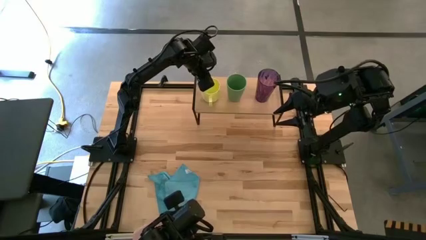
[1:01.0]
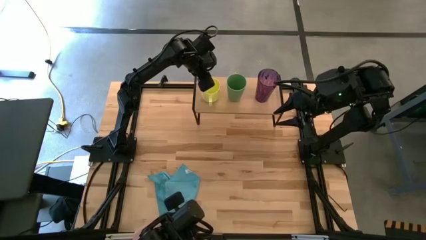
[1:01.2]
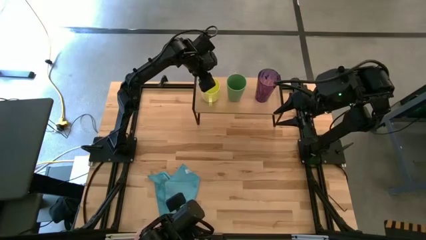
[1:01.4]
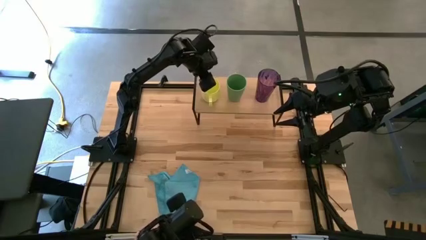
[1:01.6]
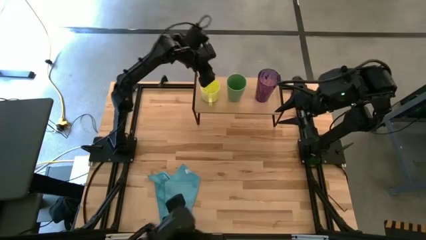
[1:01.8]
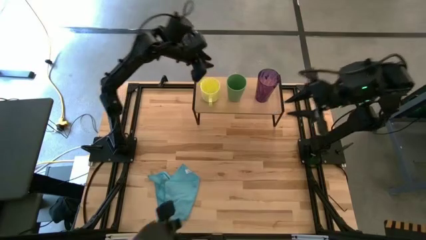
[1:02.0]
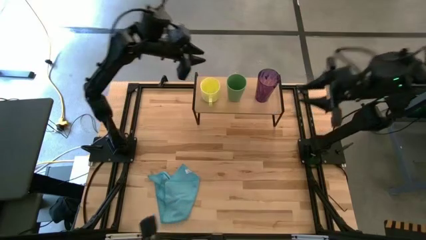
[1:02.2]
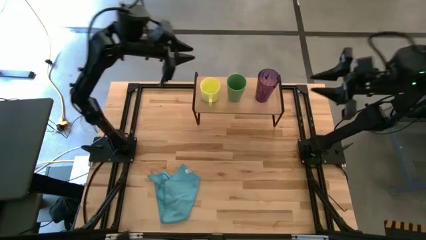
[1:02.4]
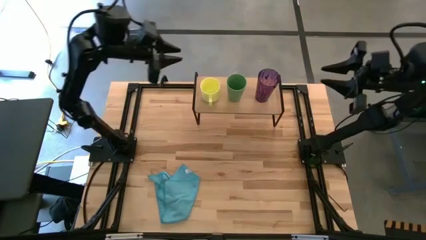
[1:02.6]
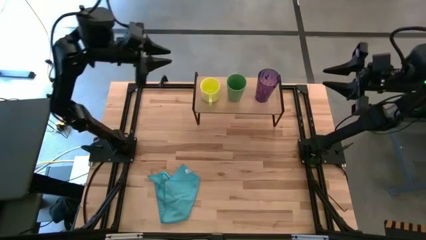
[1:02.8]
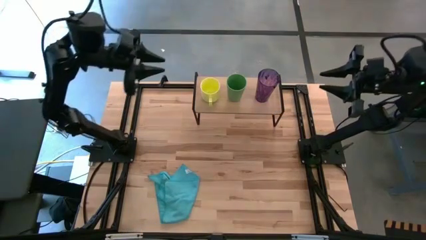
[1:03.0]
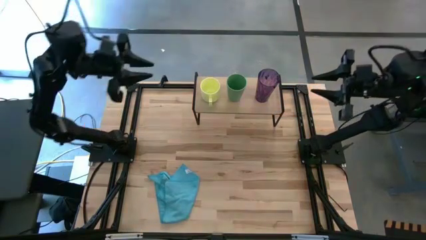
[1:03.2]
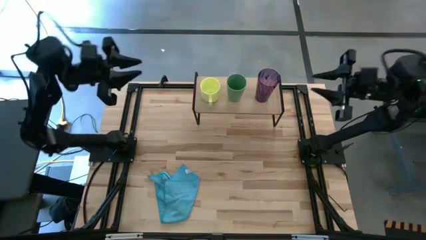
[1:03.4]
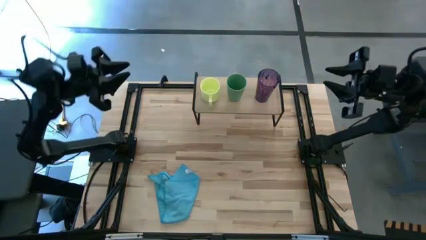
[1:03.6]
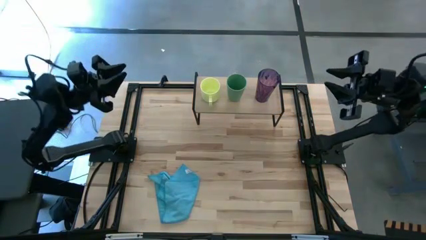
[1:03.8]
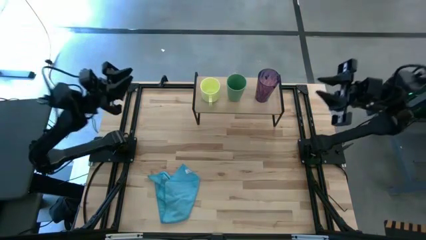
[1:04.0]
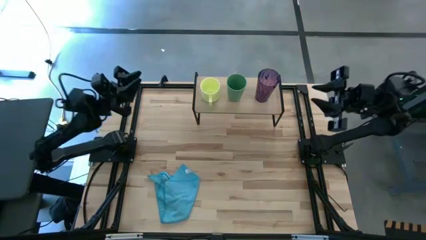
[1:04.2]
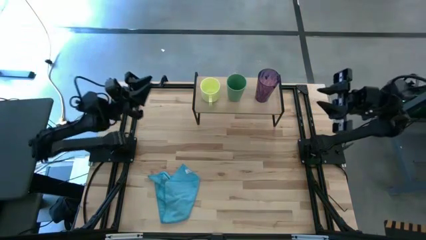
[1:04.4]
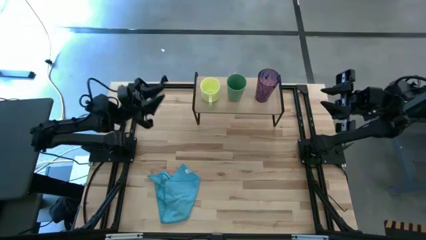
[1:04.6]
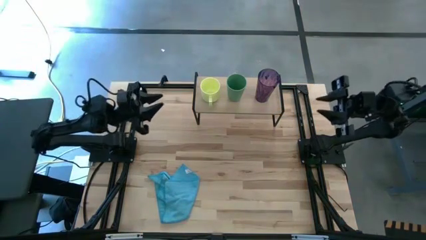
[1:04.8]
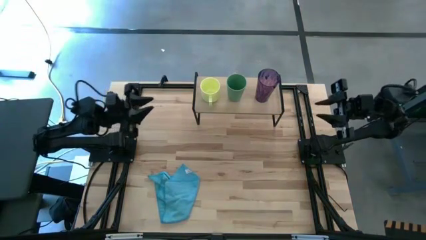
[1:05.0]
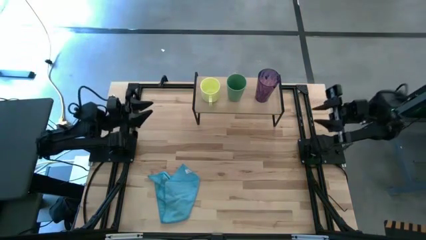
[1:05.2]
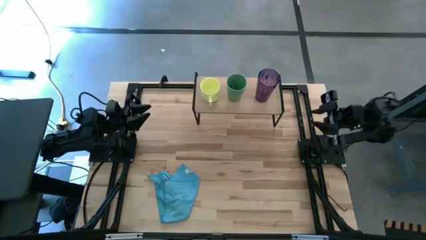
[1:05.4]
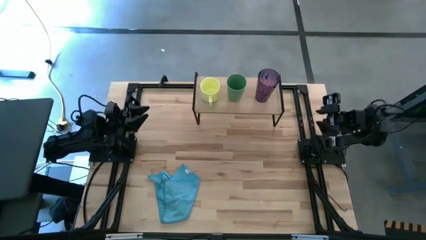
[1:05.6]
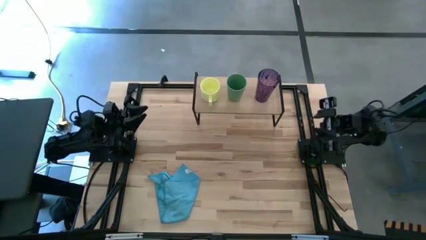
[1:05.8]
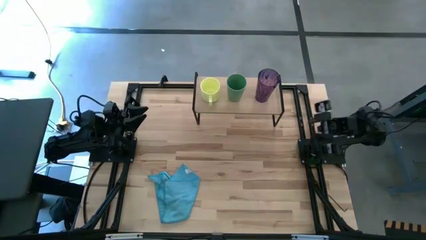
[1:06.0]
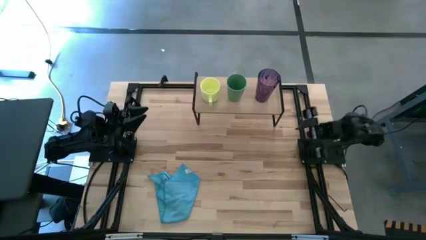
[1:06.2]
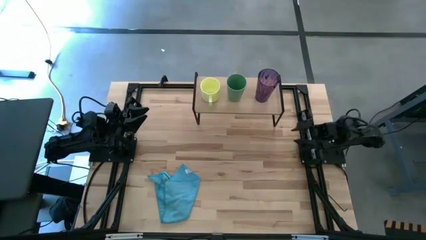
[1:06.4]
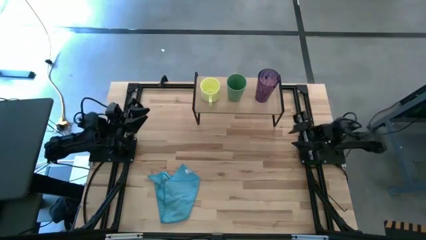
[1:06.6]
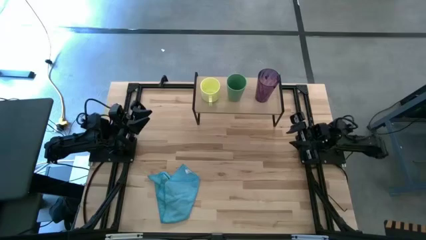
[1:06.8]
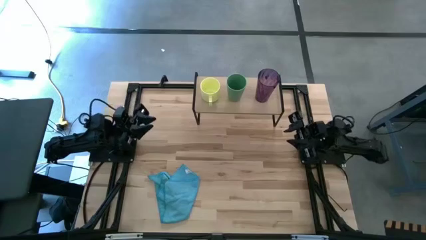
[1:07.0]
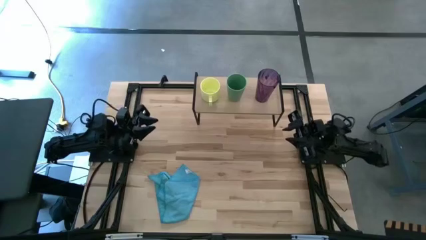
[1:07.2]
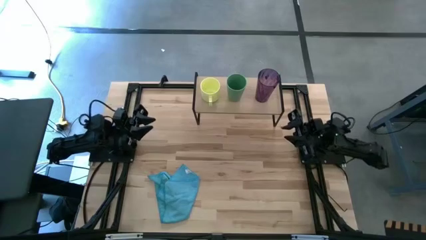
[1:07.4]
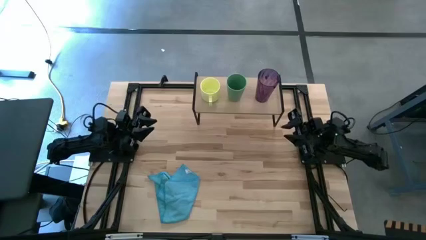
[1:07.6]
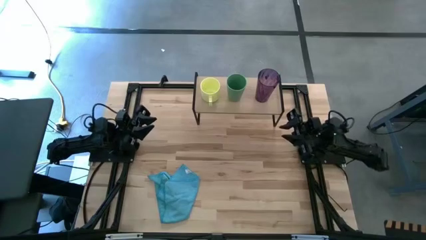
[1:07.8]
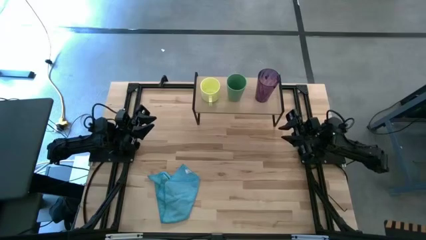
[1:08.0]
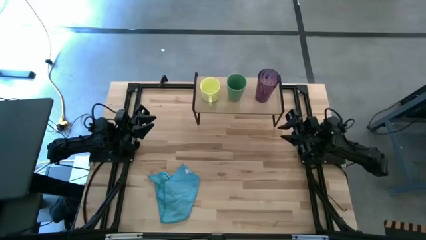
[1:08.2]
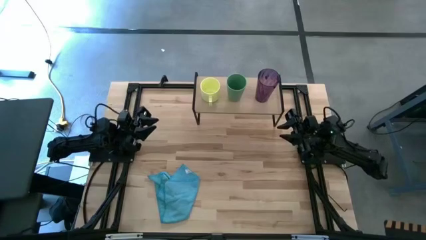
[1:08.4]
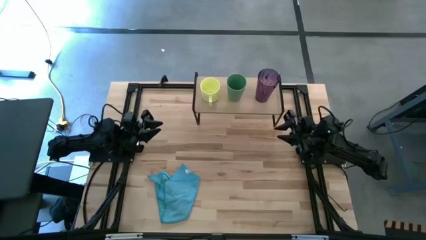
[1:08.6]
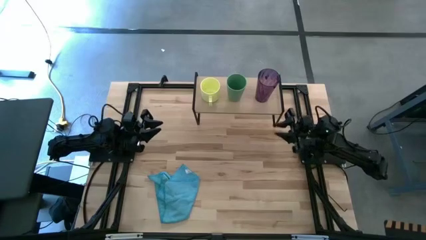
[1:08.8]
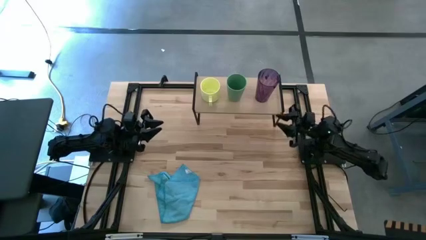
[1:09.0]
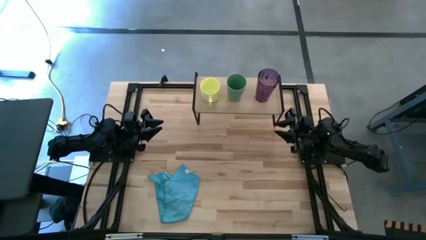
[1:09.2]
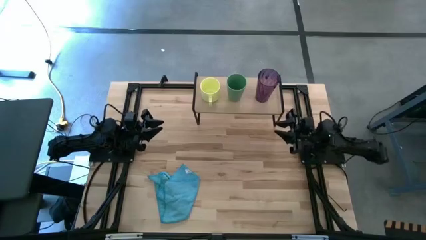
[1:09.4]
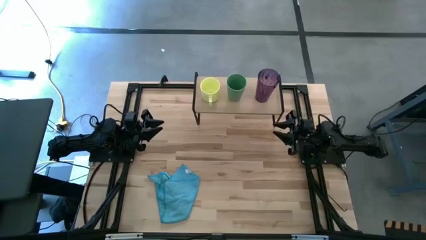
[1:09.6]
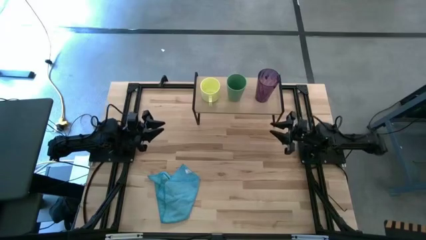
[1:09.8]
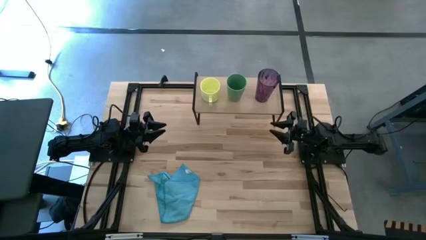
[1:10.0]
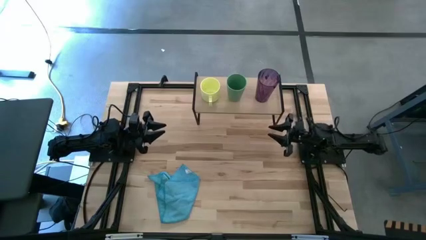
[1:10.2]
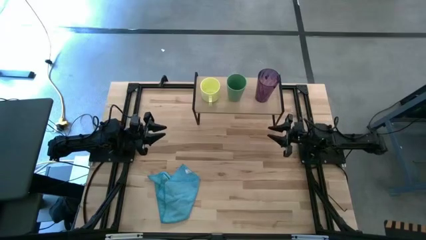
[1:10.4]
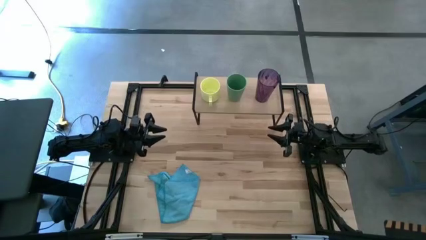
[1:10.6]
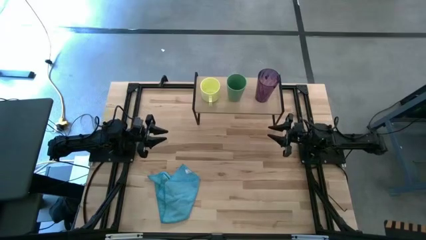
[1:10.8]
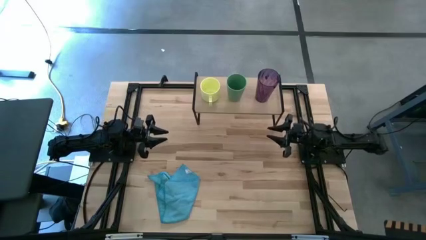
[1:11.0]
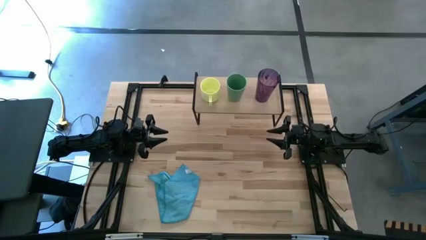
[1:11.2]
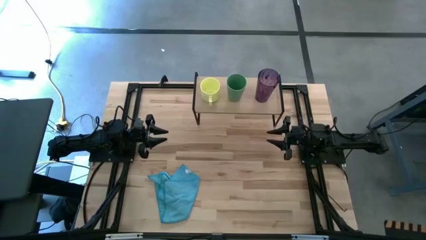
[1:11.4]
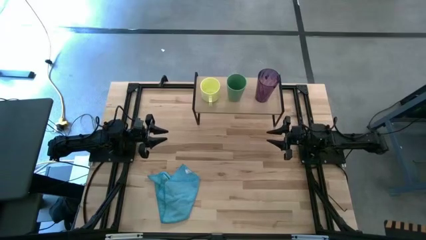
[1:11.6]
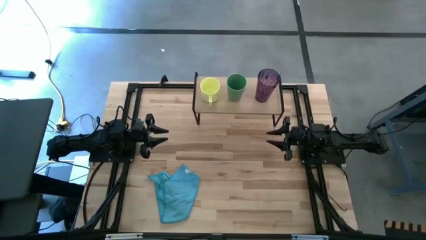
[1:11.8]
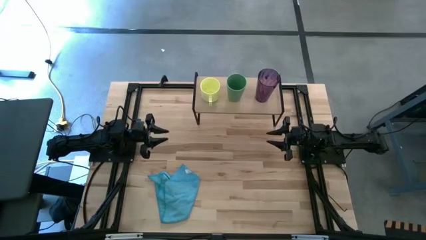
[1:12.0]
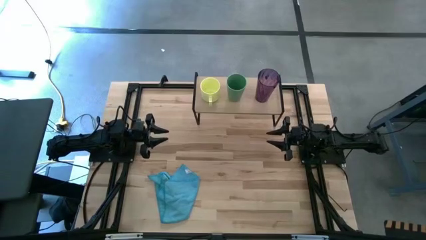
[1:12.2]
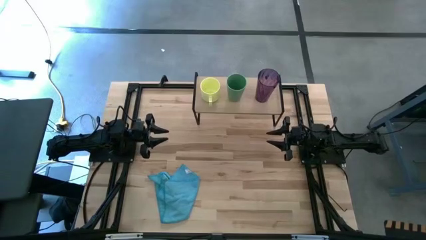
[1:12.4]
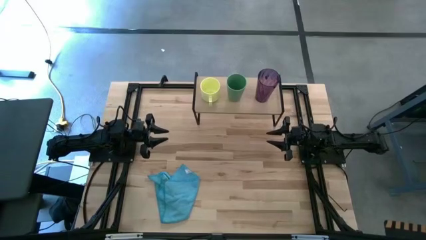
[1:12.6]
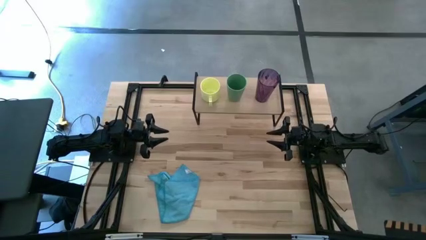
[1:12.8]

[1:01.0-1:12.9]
Task: Stack small to large cups/mugs on shelf
Return to Home Position
